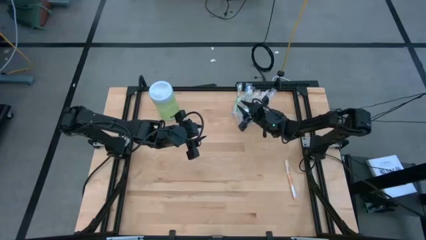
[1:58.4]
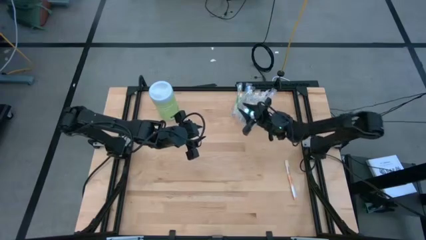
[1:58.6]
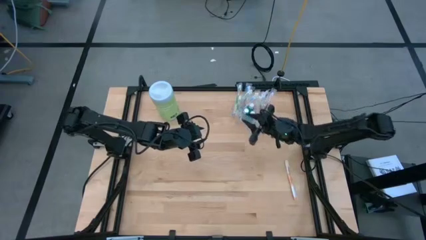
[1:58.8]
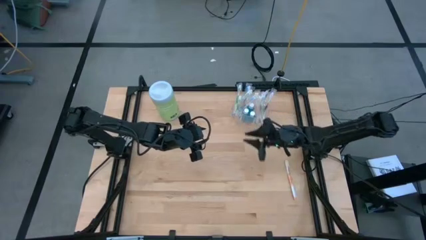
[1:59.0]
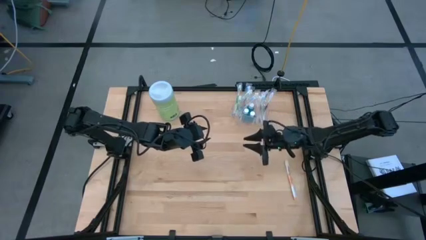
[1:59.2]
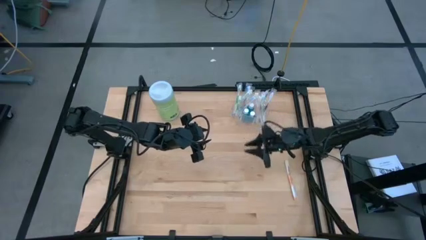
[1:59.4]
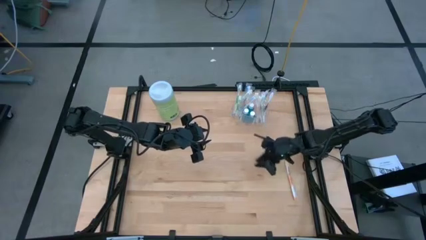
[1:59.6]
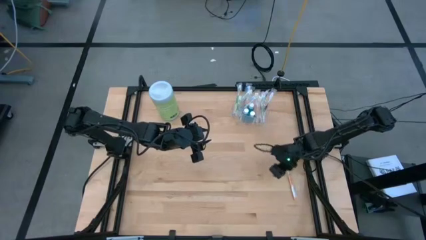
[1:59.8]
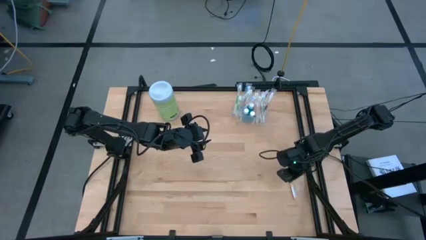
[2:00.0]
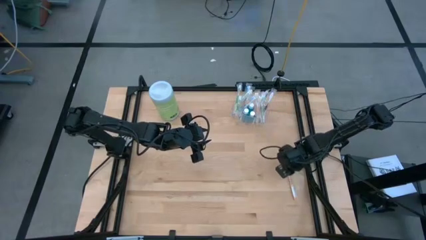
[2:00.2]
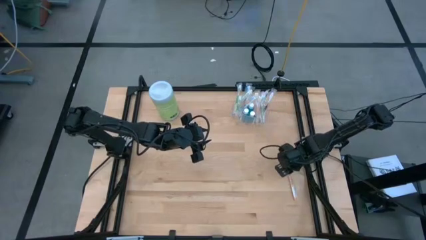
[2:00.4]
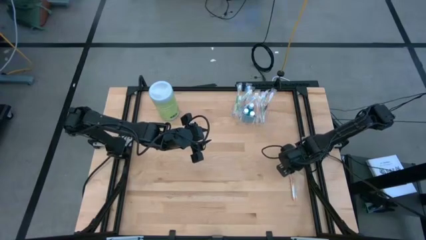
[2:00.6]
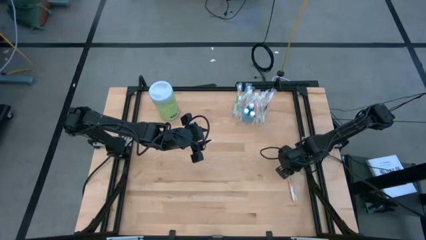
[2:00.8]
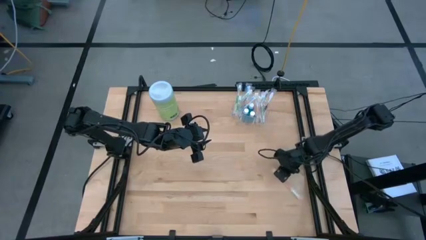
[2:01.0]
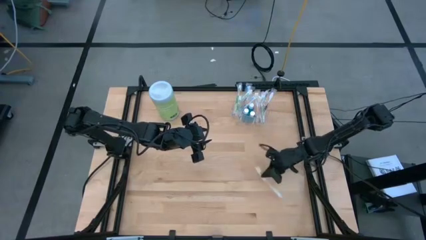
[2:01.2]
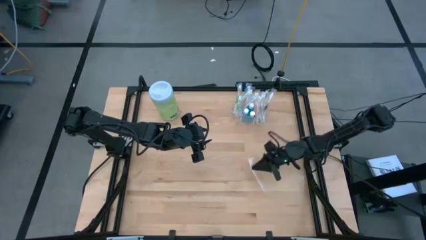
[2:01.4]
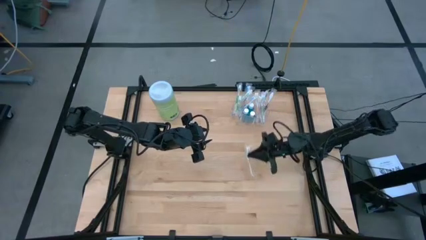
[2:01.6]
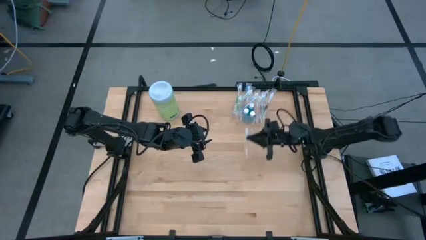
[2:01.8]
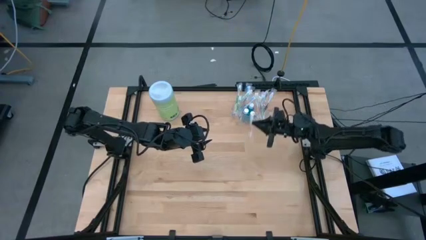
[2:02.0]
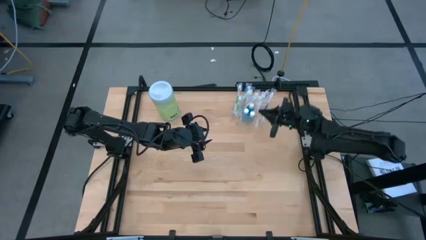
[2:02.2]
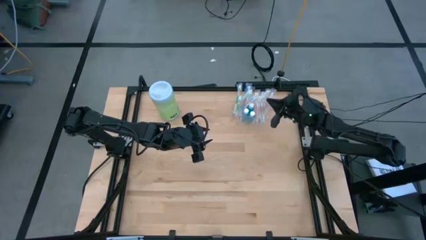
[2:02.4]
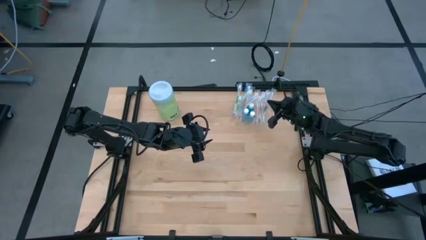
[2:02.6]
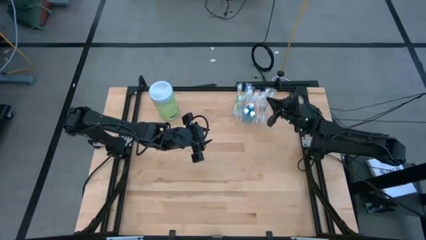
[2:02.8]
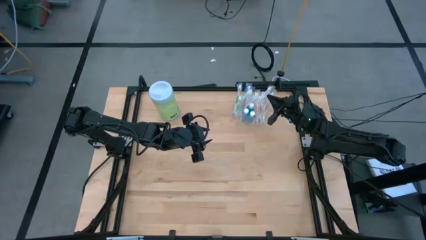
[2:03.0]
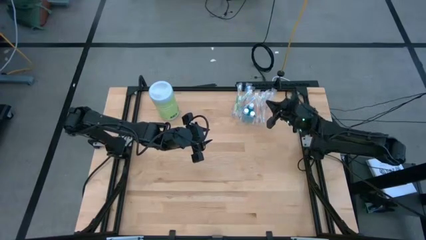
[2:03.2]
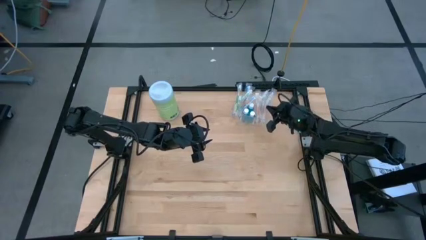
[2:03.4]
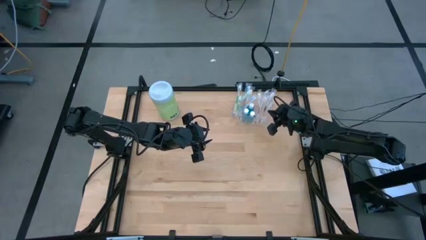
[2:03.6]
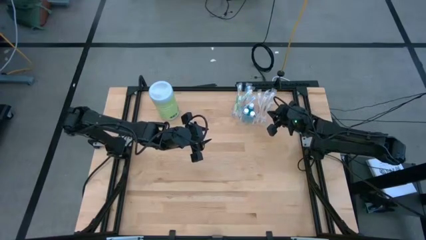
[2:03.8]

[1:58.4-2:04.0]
Task: Pick & Place toothbrushing station
Put the orange toothbrush into the transparent organizer

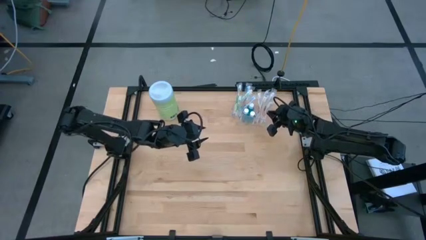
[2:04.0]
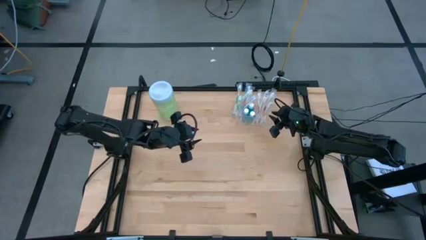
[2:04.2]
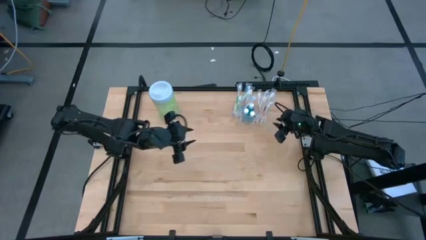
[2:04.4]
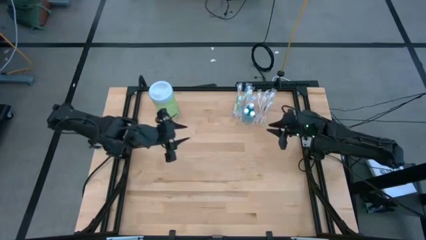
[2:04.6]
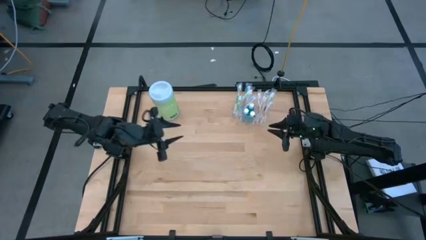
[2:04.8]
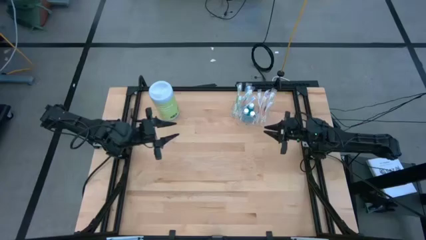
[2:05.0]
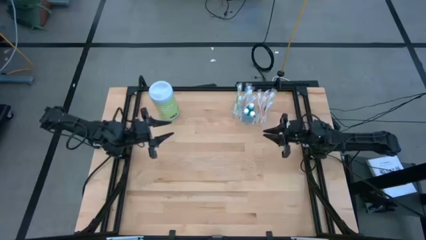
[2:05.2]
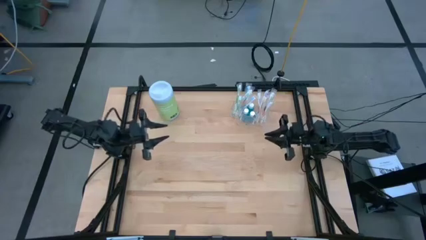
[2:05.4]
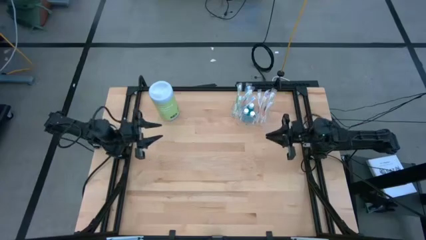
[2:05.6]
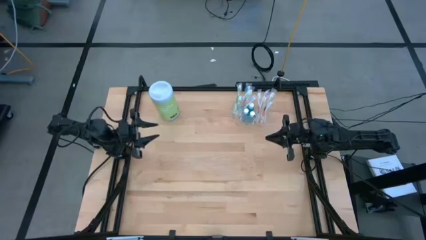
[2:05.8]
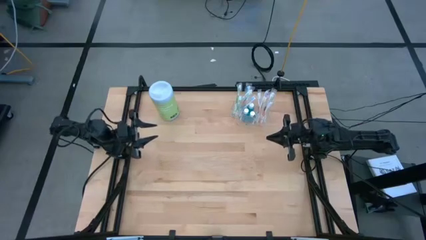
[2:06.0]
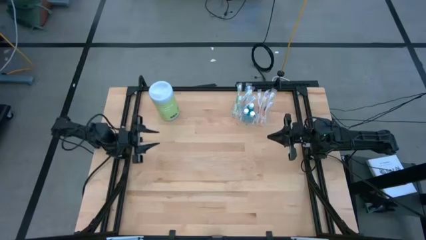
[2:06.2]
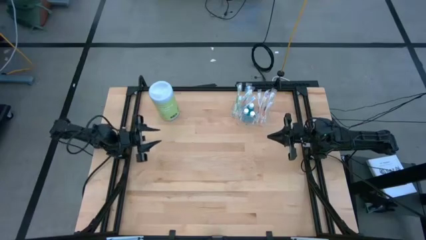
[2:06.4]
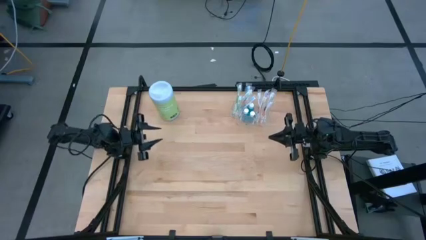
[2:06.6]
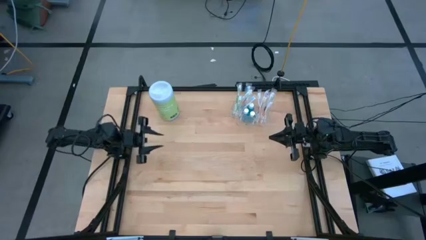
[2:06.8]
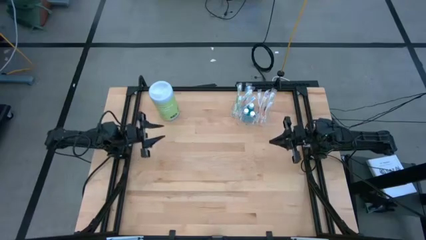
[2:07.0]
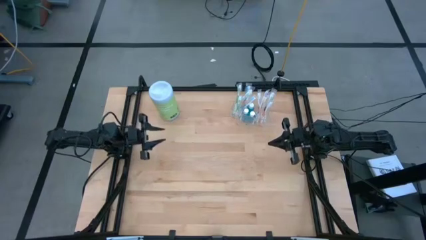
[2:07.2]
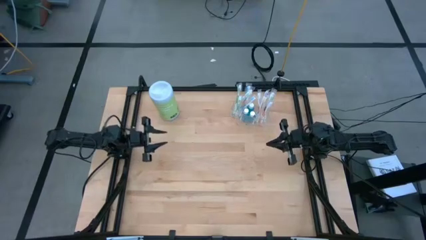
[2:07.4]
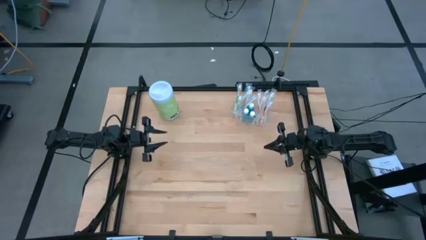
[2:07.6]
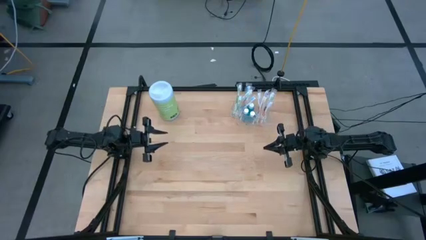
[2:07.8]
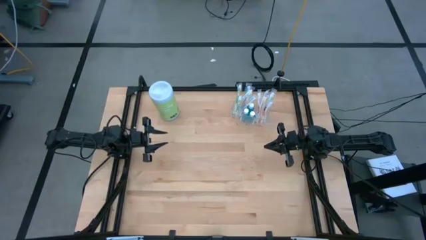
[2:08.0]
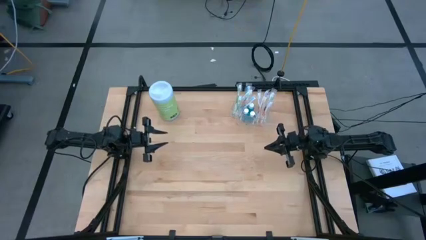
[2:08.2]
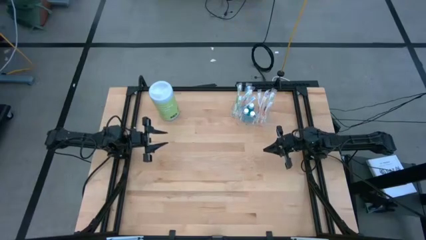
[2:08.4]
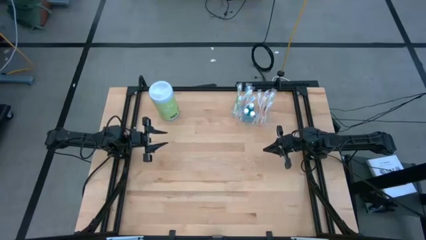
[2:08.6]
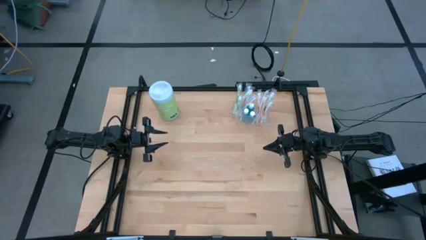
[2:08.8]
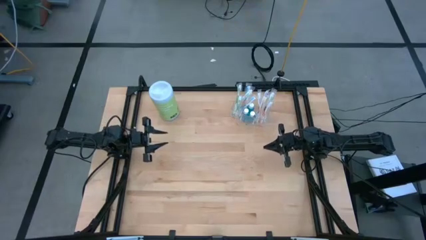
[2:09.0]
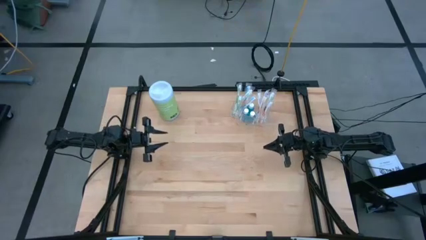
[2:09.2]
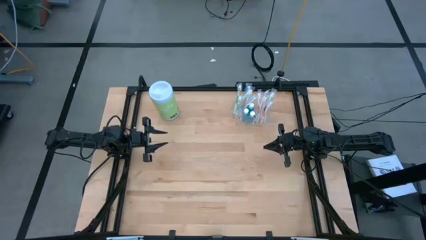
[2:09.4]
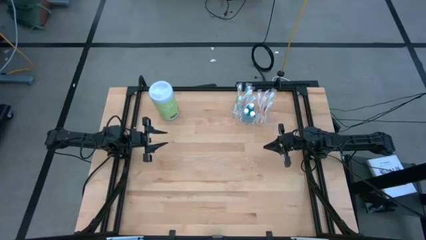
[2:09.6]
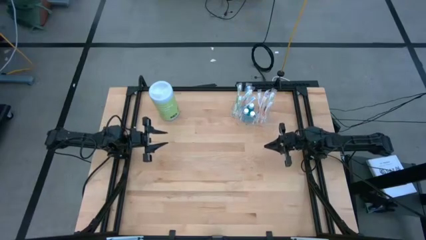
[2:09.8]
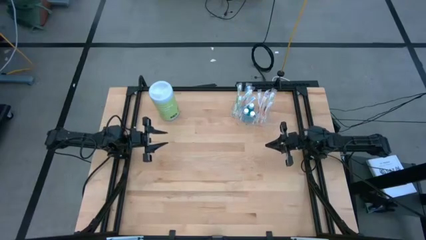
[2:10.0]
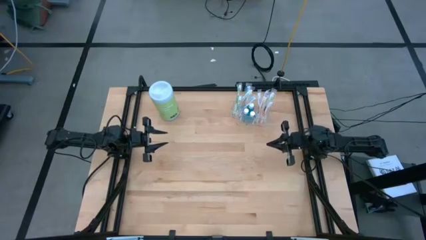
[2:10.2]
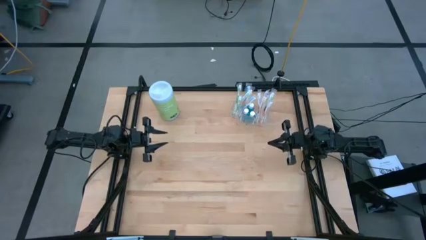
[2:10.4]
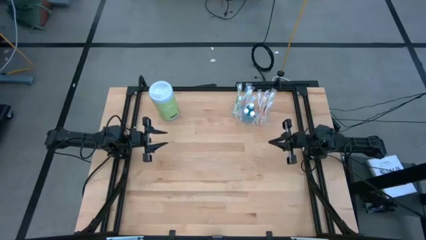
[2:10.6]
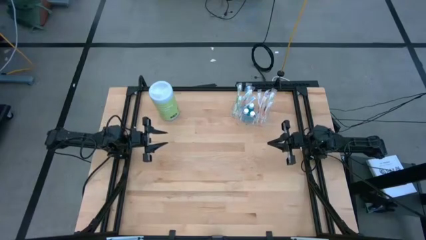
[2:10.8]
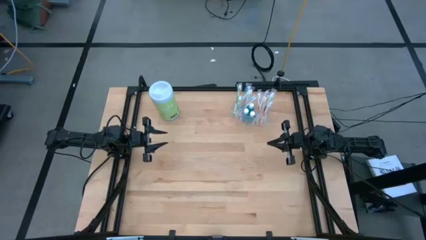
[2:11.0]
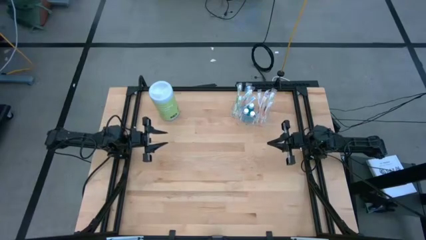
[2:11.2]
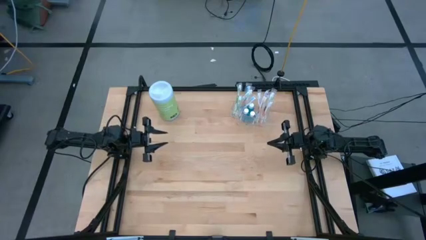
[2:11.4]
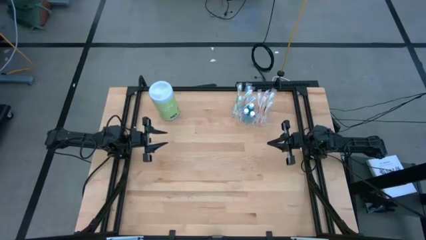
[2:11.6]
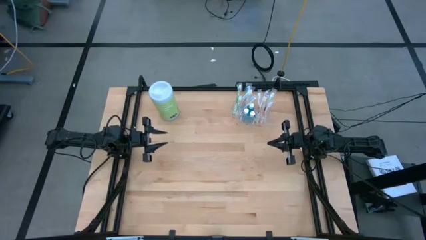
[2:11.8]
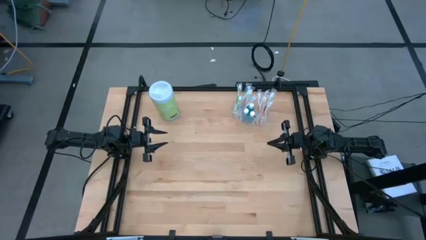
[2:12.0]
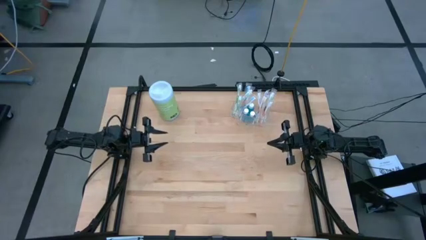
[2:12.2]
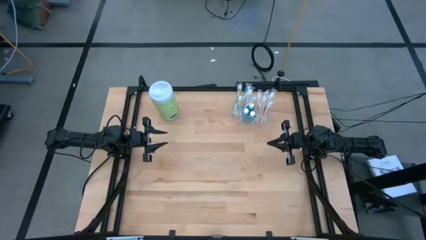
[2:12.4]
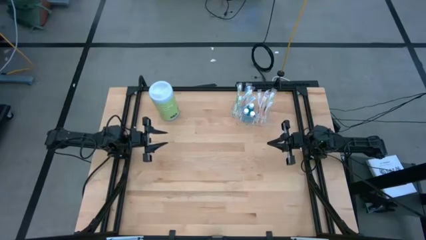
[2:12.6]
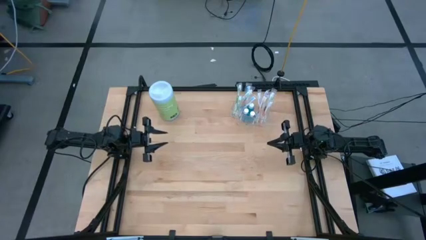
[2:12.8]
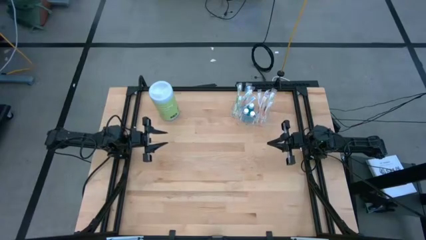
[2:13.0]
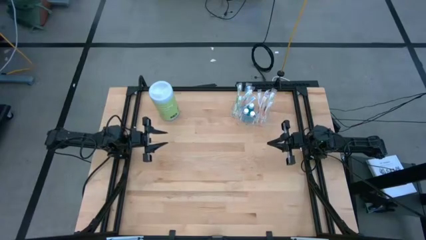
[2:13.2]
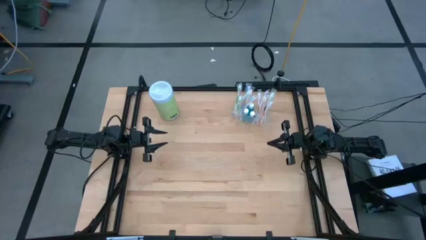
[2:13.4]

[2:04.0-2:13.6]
Return to Home Position

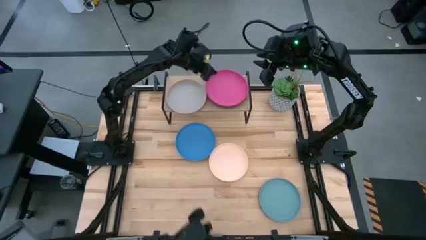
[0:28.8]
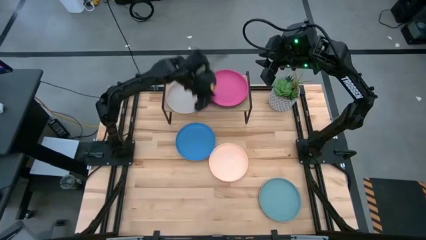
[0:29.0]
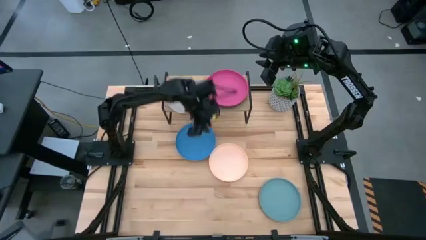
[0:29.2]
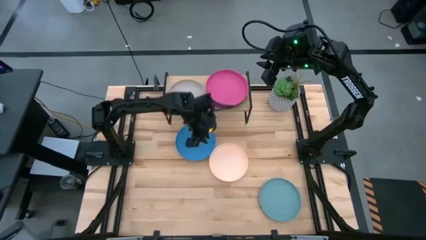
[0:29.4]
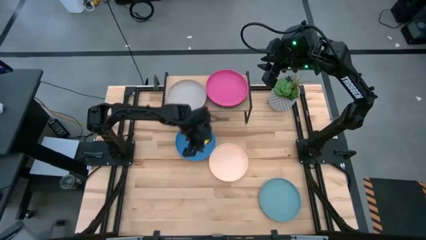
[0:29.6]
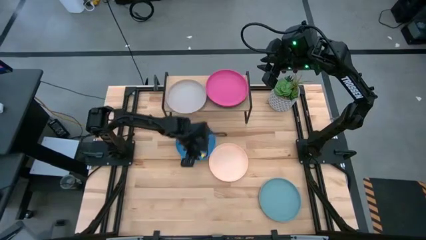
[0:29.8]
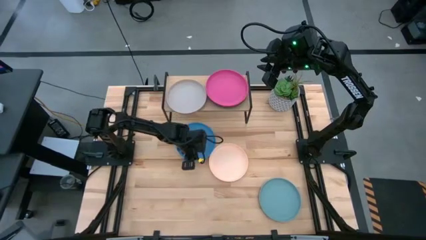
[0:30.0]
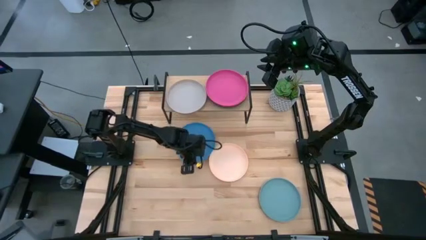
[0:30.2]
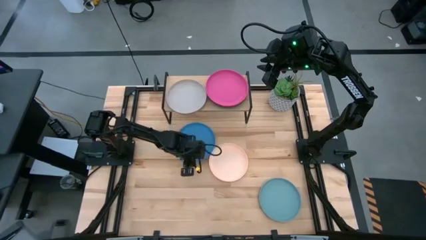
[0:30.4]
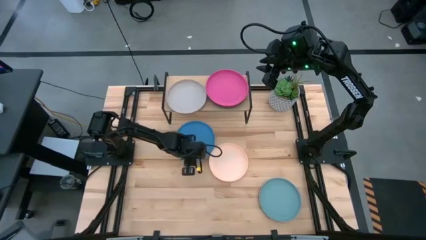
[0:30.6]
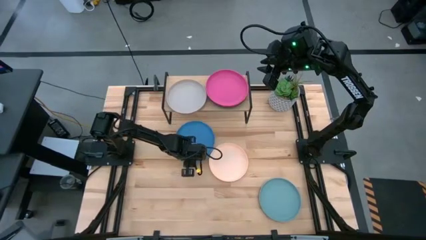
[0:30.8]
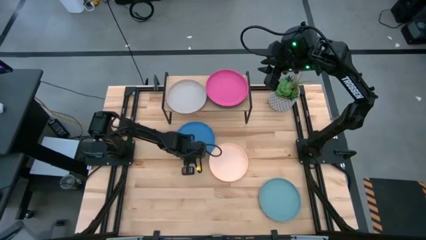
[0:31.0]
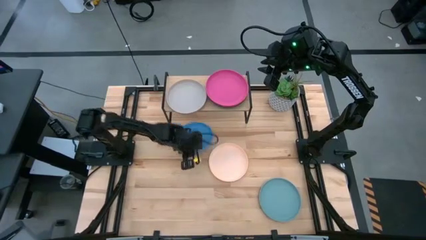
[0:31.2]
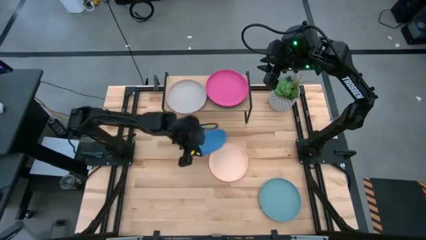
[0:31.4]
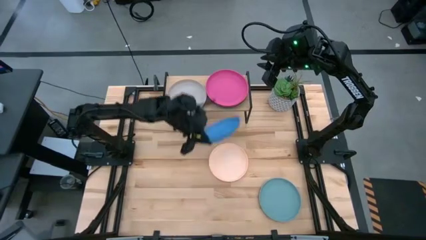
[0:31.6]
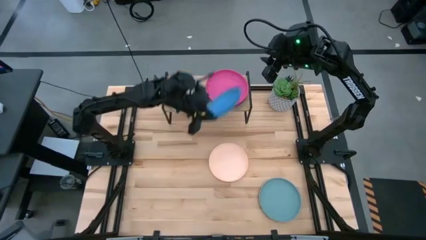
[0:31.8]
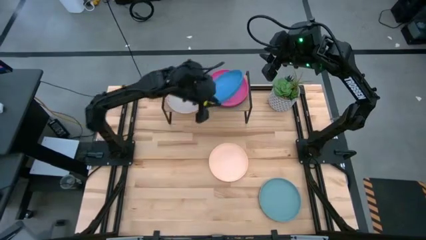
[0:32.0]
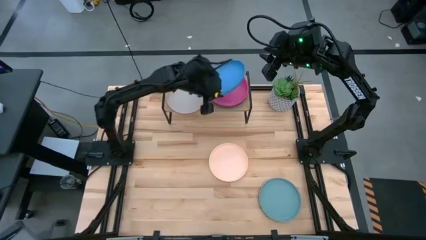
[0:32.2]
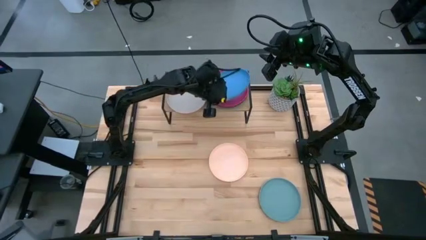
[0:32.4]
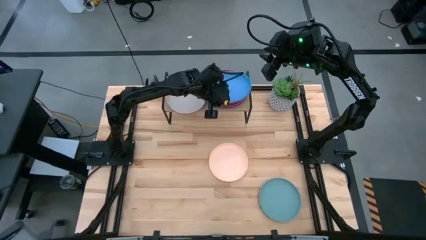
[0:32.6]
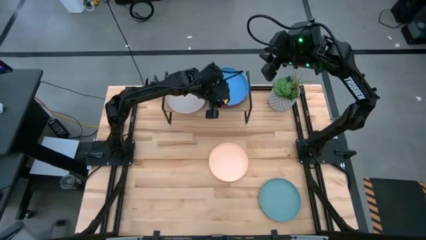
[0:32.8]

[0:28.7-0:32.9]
Task: Place and stack plates onto a shelf
Stack the blue plate on top of the pink plate on the shelf
